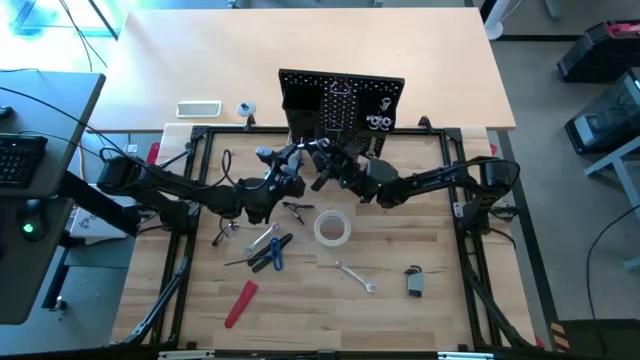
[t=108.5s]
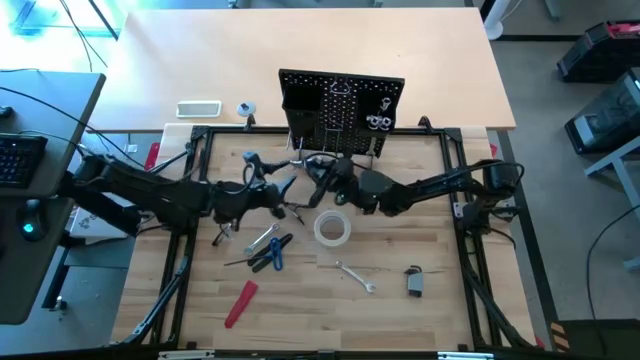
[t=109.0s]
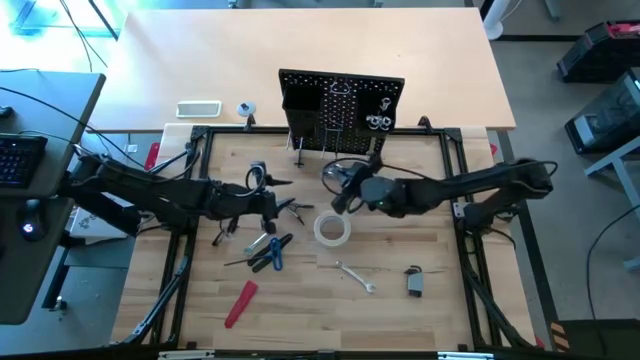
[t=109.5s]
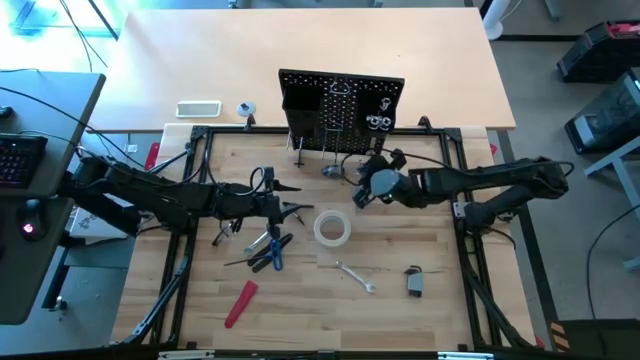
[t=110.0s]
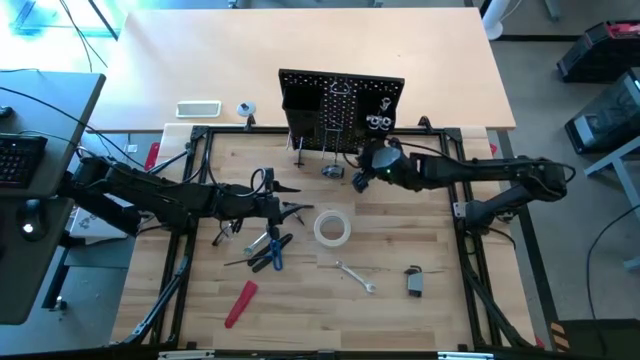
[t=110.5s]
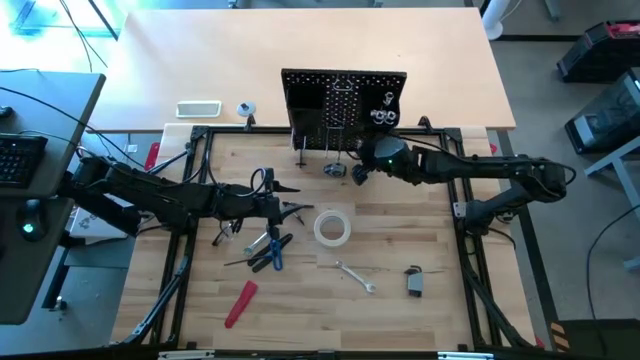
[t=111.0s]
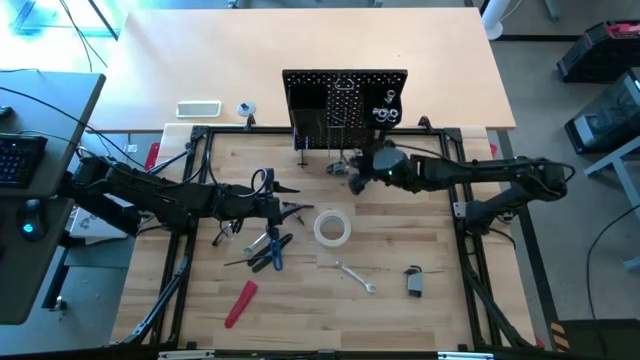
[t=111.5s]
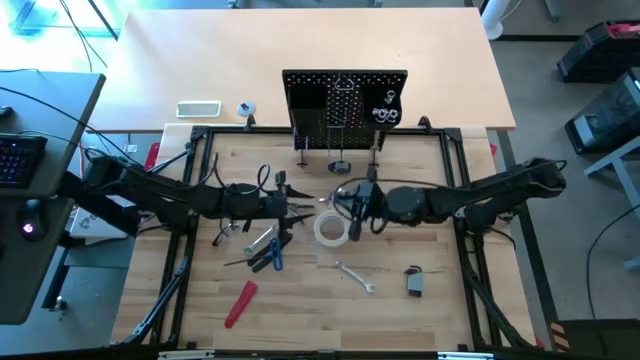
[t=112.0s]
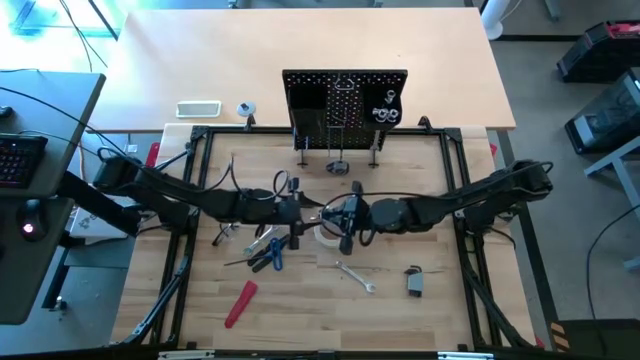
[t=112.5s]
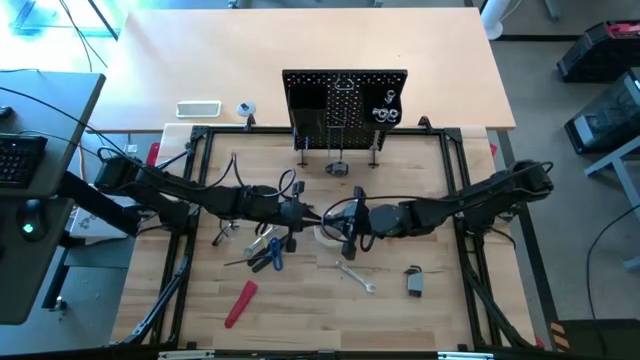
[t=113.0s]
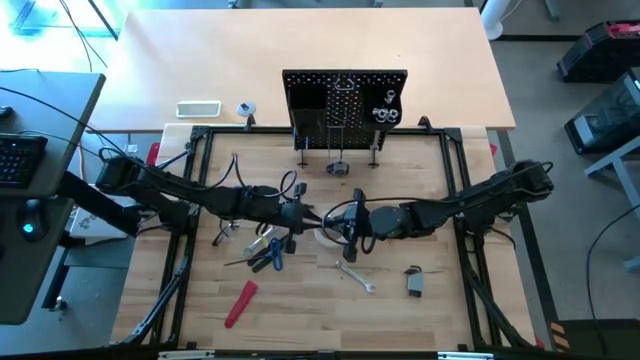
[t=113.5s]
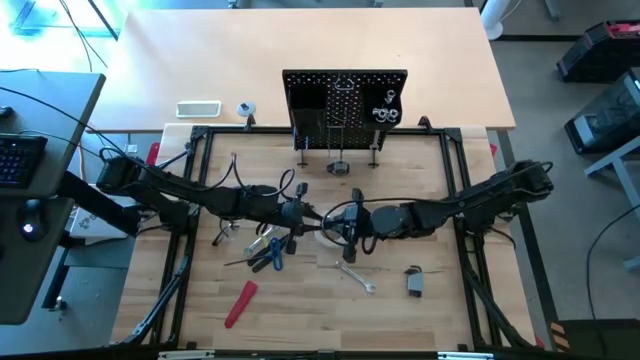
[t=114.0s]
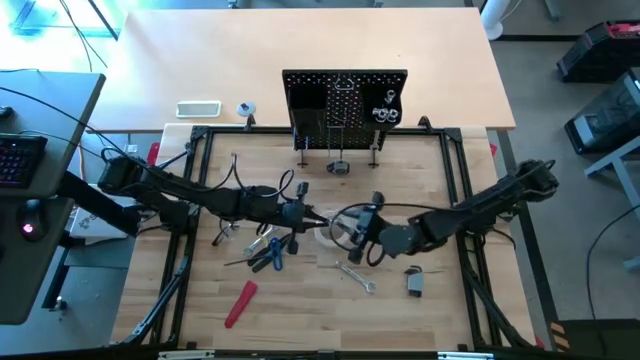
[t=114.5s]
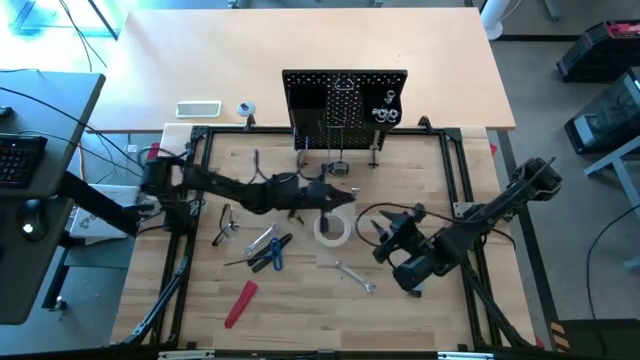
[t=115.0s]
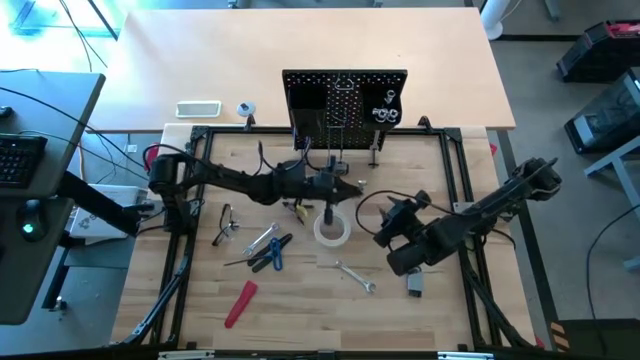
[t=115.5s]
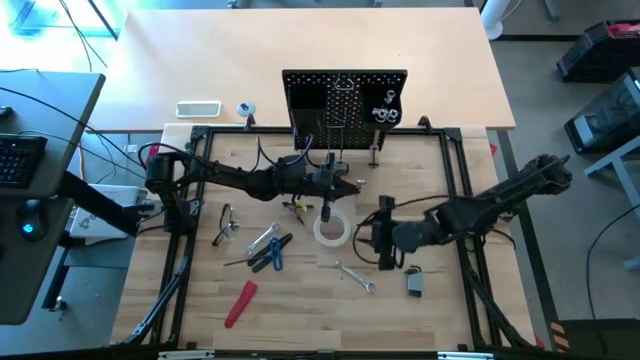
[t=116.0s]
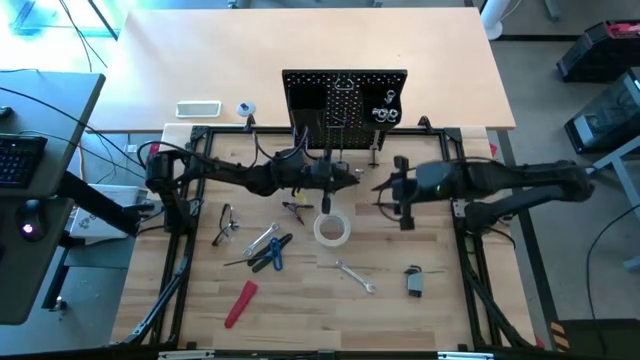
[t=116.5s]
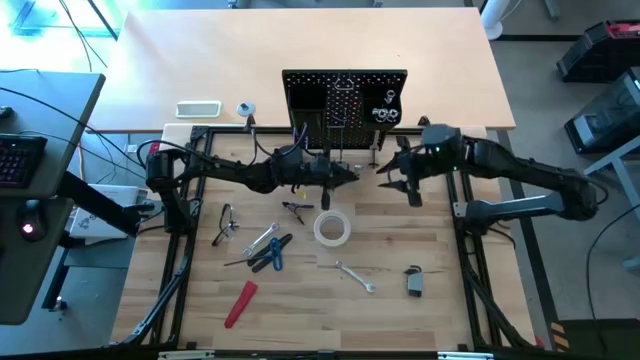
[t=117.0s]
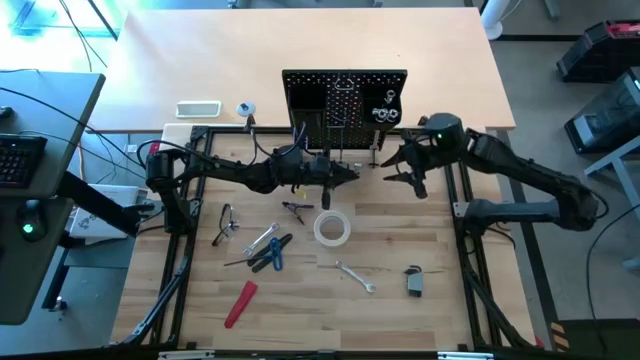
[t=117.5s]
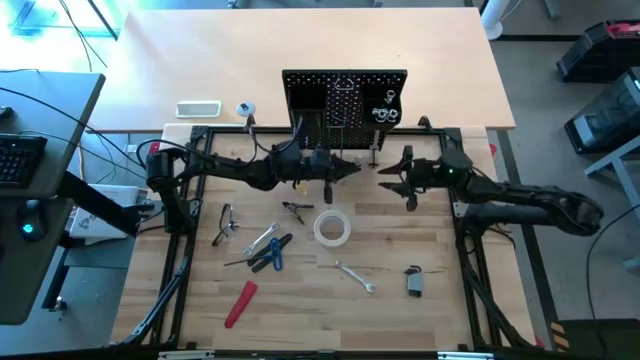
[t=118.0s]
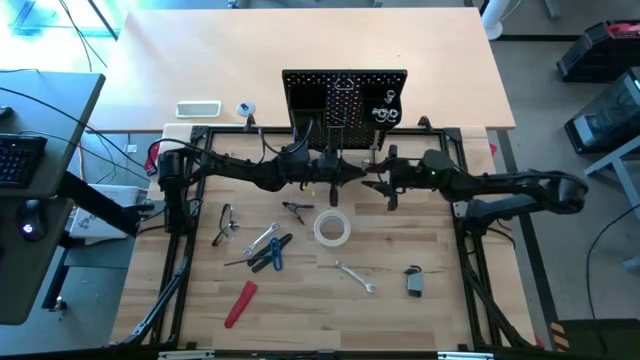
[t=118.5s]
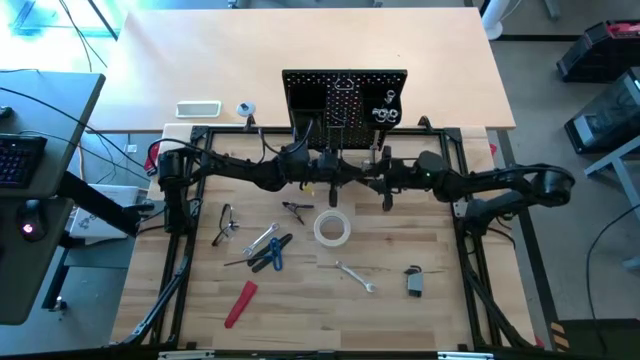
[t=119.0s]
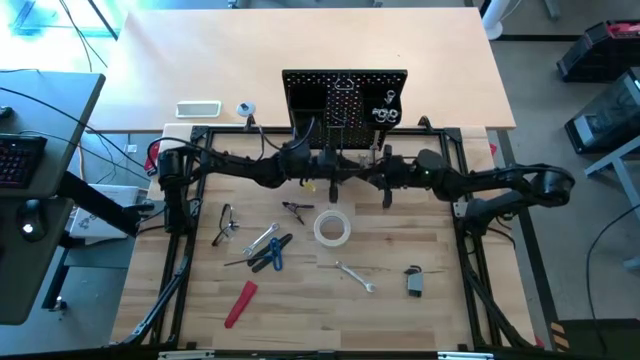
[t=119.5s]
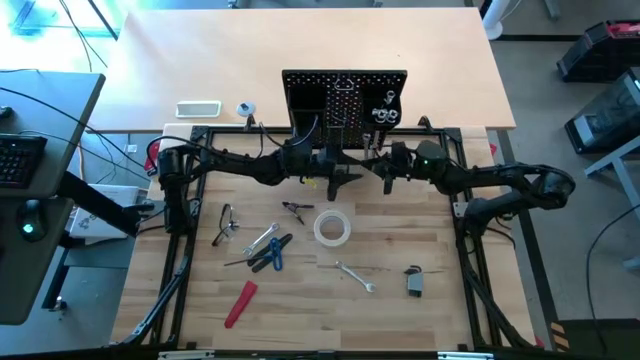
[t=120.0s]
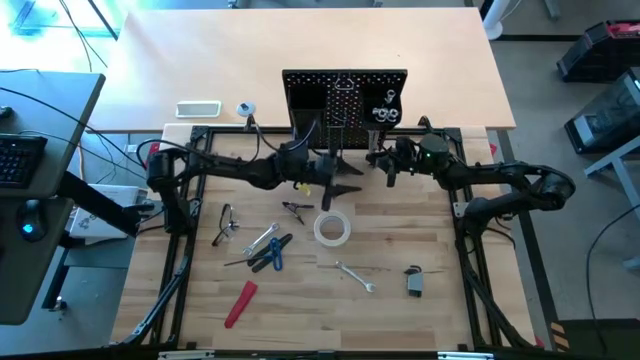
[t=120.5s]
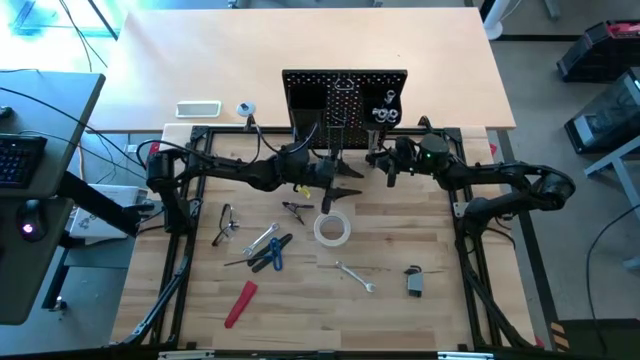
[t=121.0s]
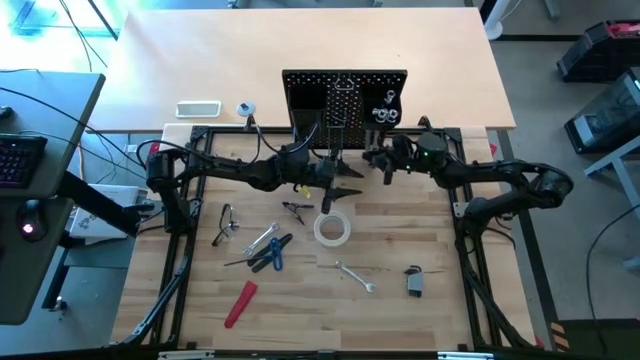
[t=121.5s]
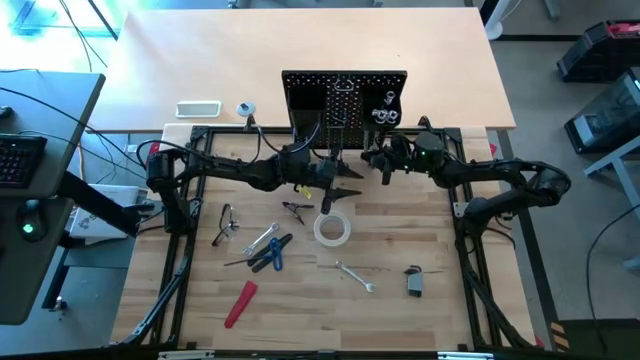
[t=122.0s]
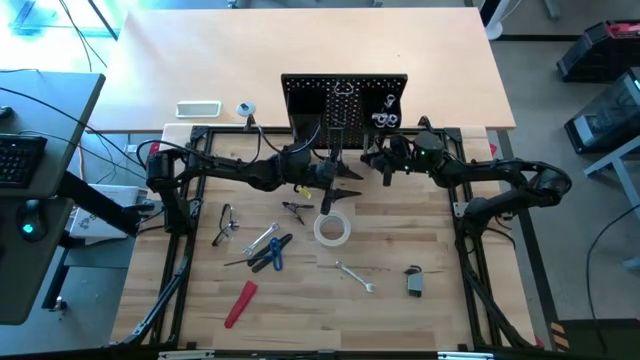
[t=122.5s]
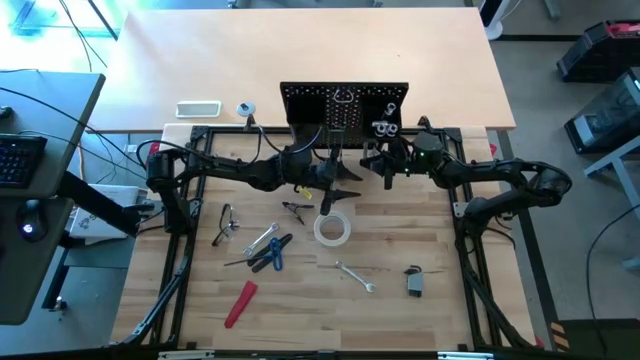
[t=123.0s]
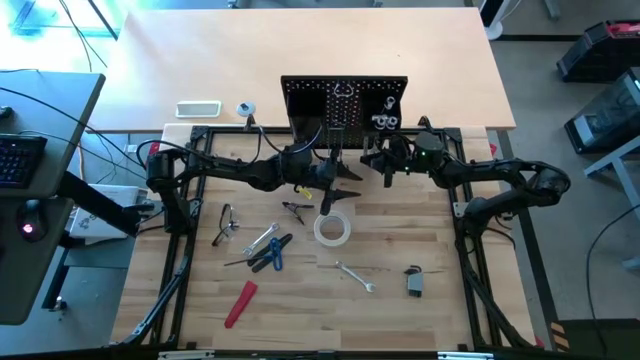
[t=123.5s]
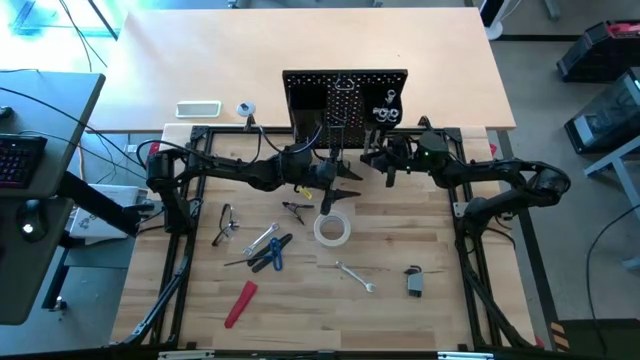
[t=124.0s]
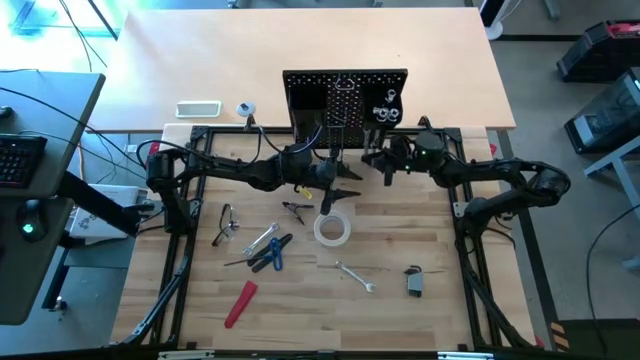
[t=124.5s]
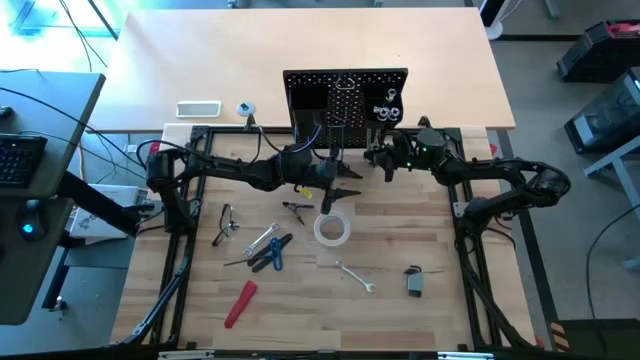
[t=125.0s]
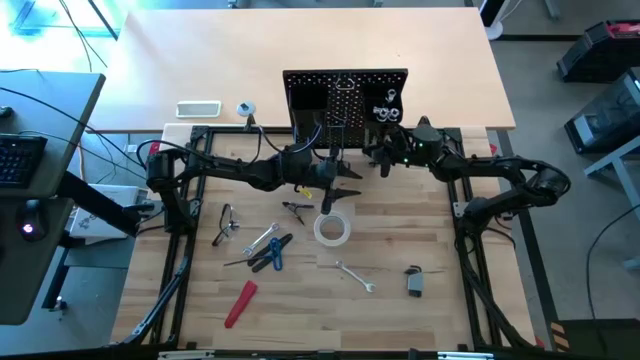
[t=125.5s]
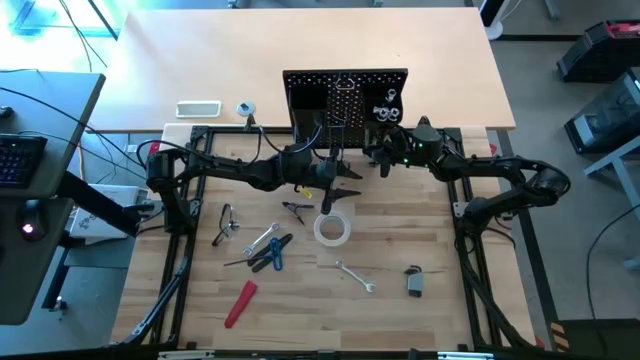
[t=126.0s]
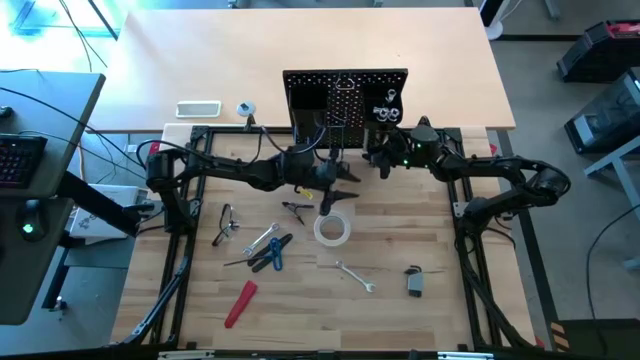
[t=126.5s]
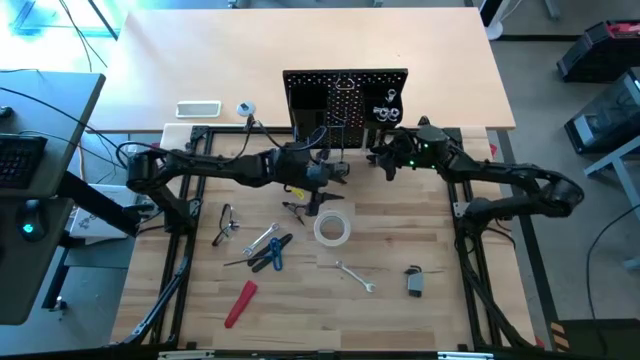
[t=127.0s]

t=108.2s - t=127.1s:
Task: Hang tools onto peg board
Hang the silver wrench on the peg board

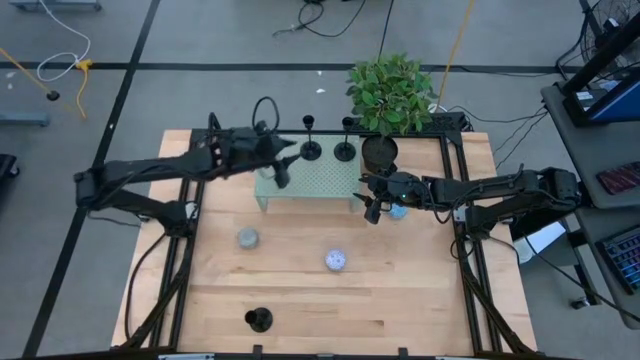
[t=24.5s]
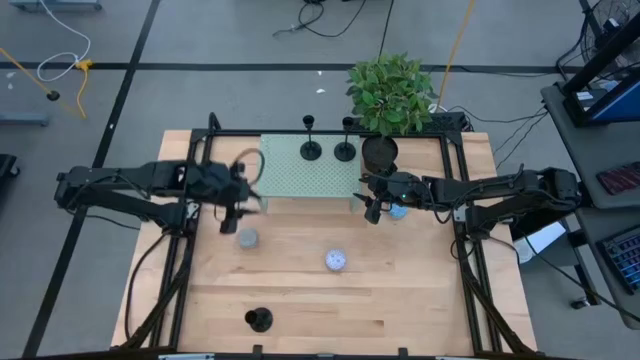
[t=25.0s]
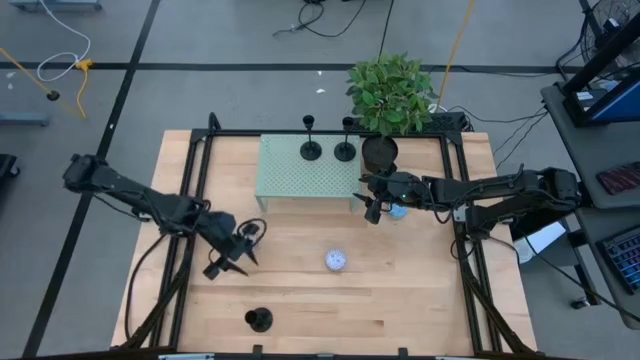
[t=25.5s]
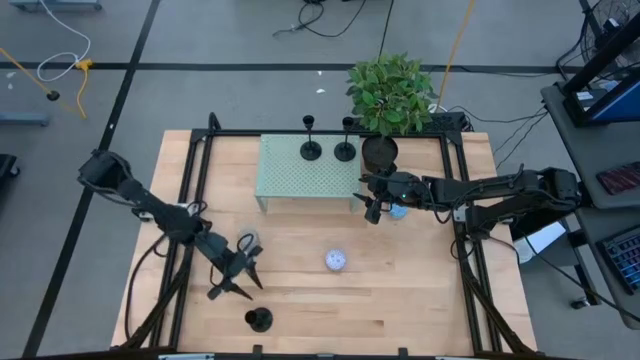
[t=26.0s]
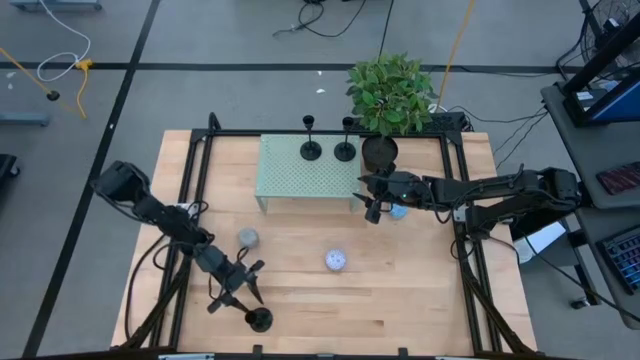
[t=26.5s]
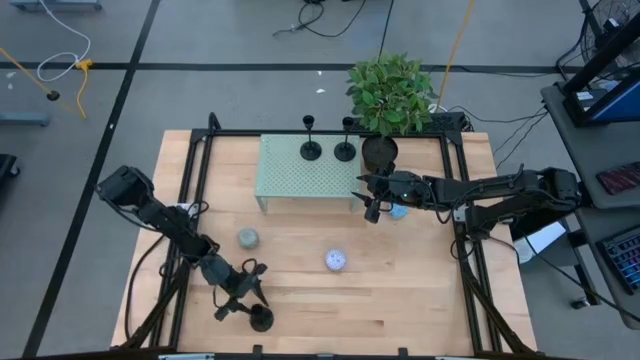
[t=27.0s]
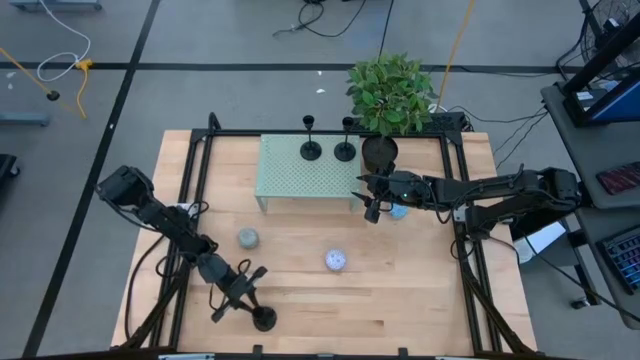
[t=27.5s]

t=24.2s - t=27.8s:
Task: Pick & Place candle stick holders
Put the black candle holder on the shelf aligned with the other black candle holders
